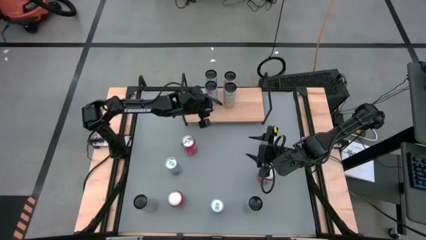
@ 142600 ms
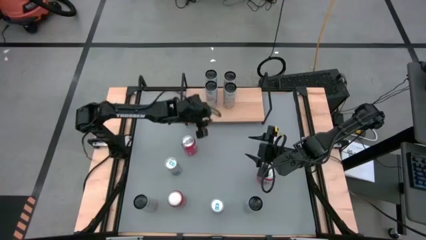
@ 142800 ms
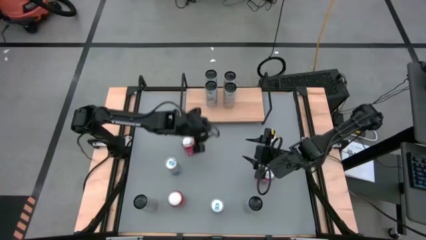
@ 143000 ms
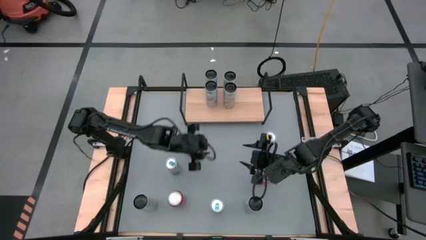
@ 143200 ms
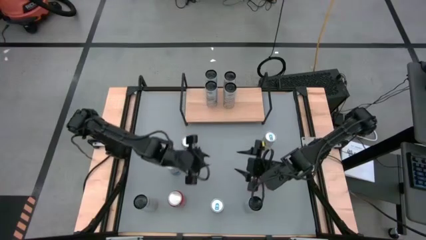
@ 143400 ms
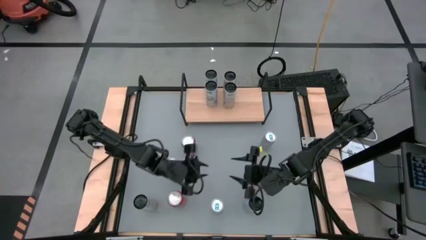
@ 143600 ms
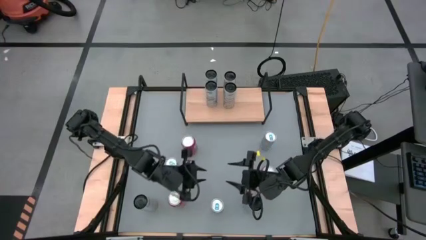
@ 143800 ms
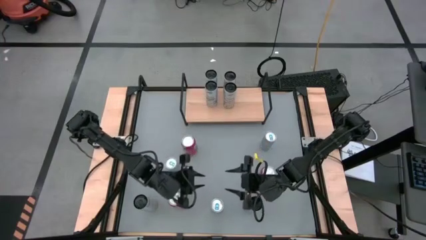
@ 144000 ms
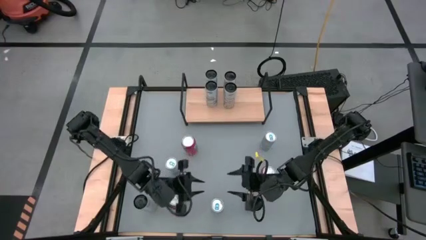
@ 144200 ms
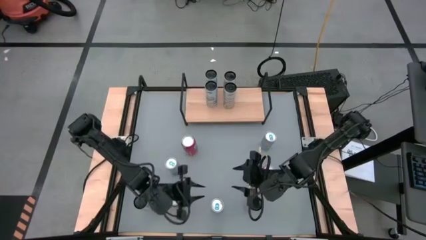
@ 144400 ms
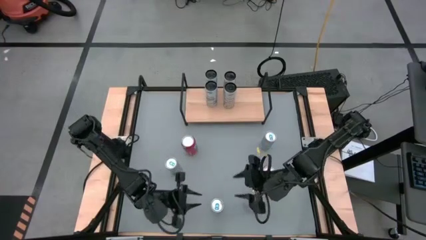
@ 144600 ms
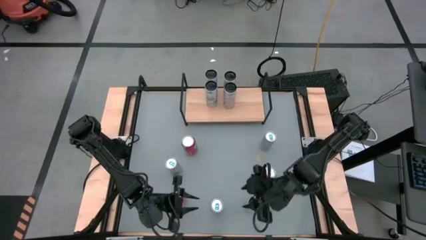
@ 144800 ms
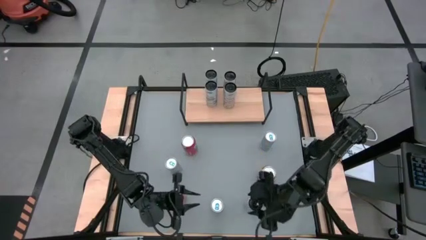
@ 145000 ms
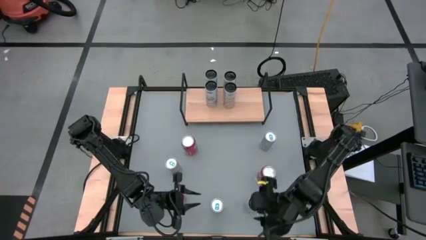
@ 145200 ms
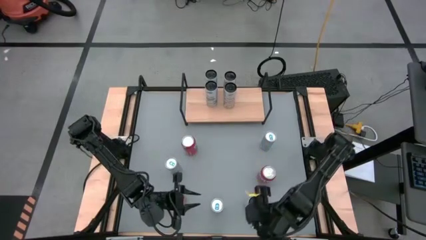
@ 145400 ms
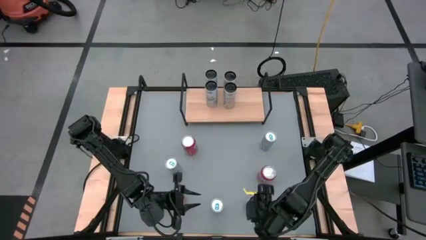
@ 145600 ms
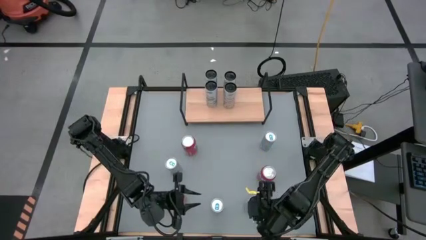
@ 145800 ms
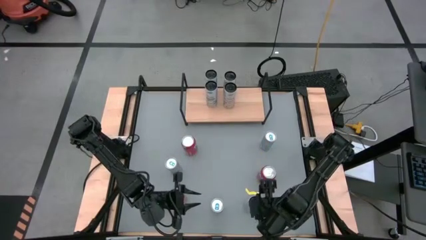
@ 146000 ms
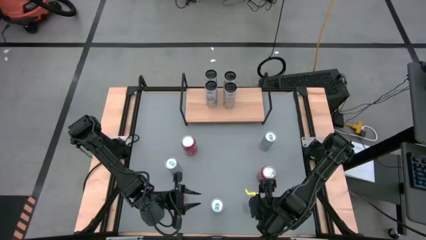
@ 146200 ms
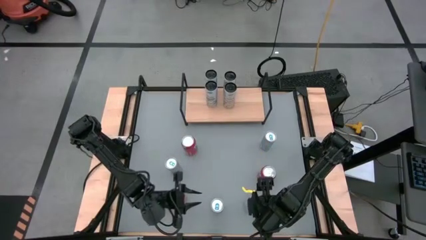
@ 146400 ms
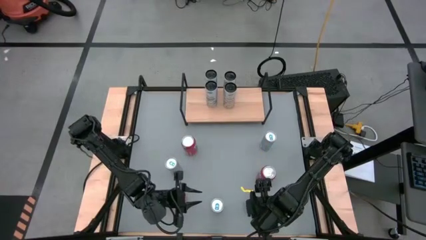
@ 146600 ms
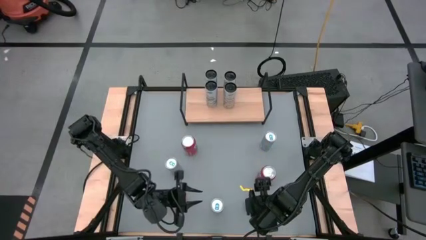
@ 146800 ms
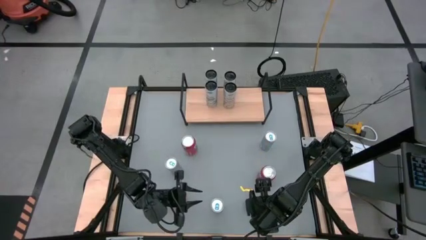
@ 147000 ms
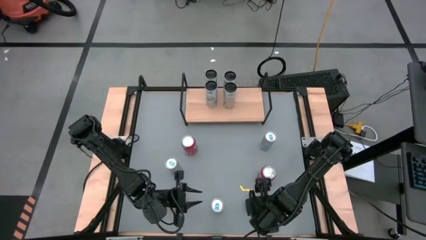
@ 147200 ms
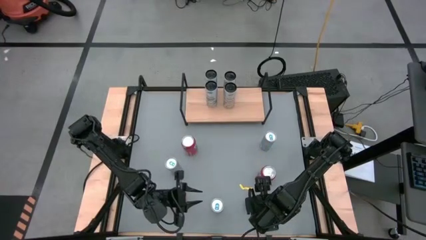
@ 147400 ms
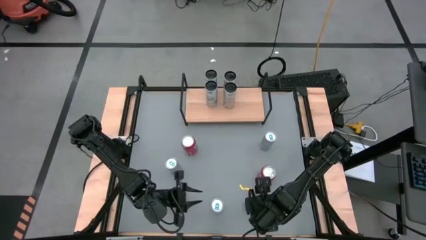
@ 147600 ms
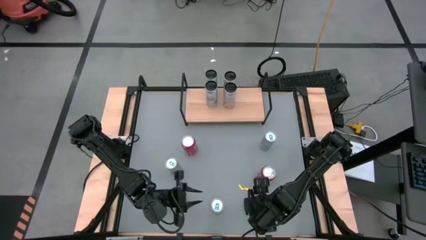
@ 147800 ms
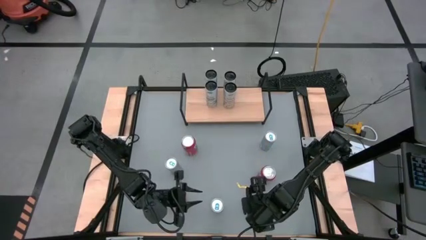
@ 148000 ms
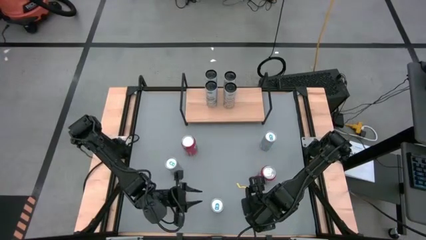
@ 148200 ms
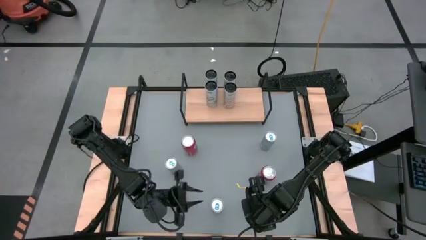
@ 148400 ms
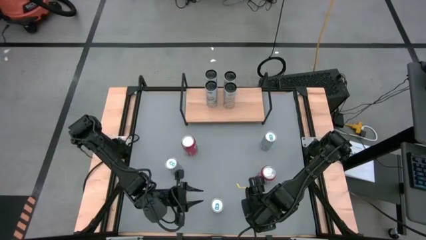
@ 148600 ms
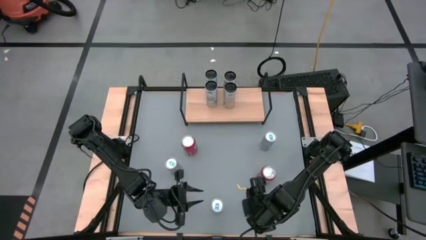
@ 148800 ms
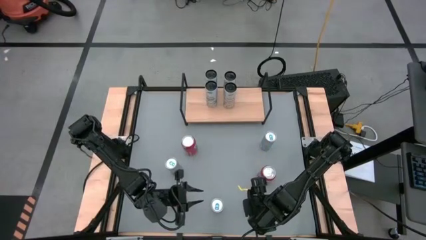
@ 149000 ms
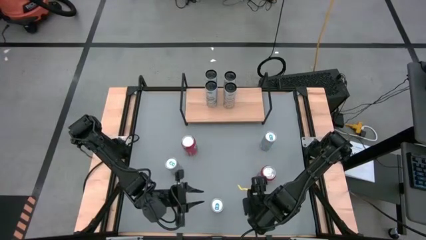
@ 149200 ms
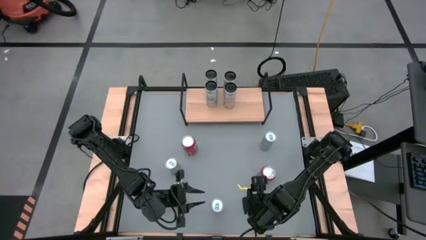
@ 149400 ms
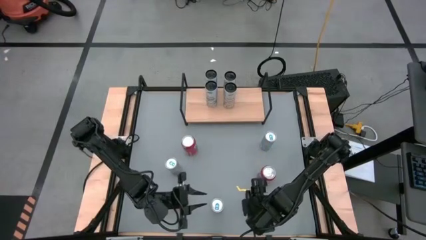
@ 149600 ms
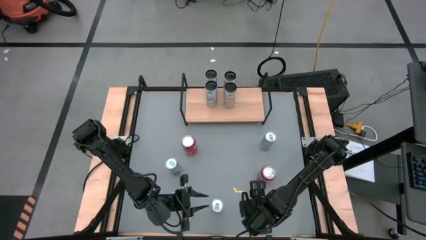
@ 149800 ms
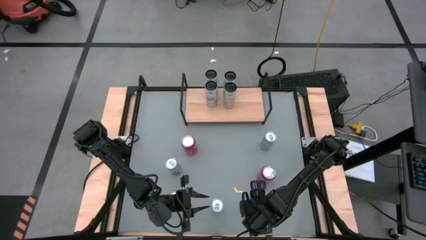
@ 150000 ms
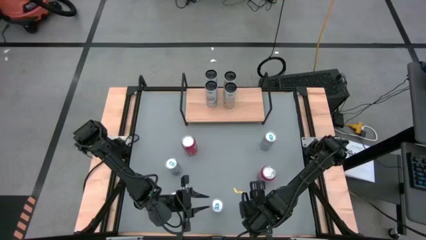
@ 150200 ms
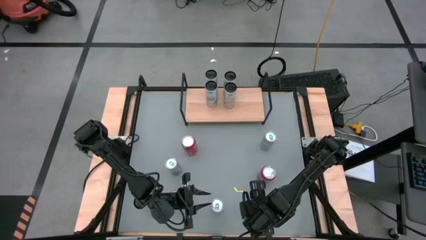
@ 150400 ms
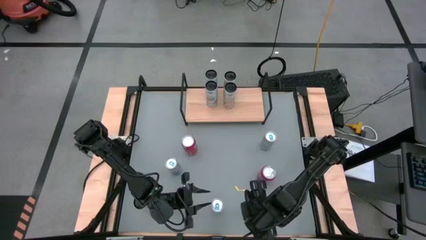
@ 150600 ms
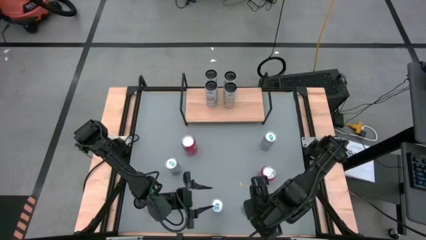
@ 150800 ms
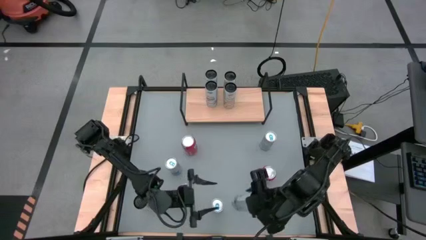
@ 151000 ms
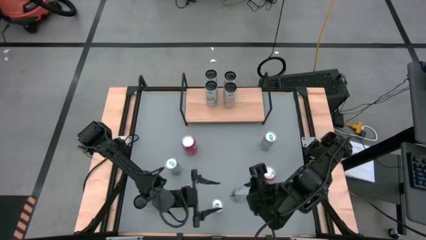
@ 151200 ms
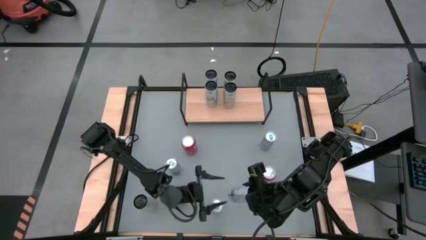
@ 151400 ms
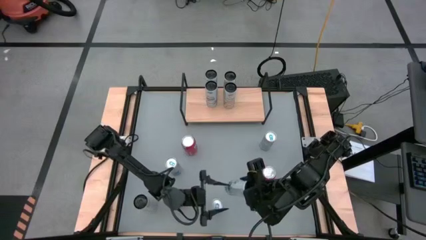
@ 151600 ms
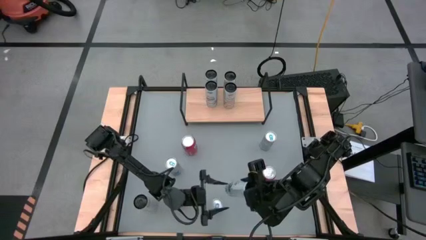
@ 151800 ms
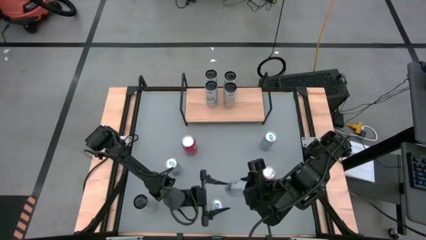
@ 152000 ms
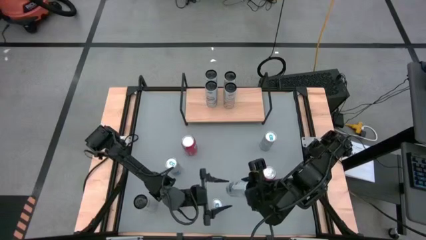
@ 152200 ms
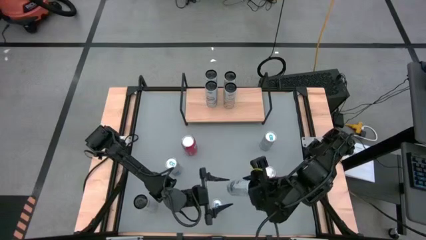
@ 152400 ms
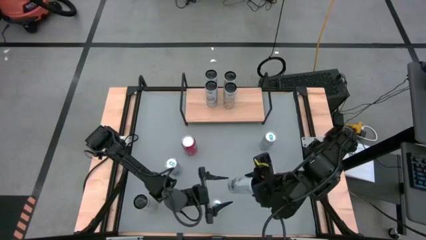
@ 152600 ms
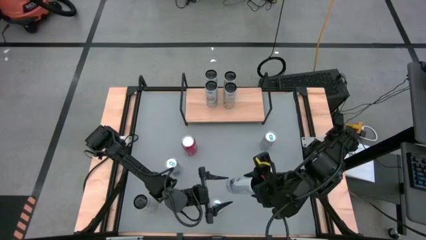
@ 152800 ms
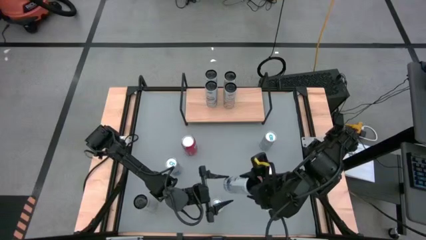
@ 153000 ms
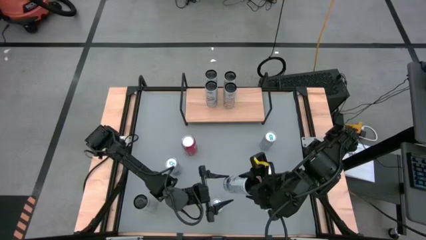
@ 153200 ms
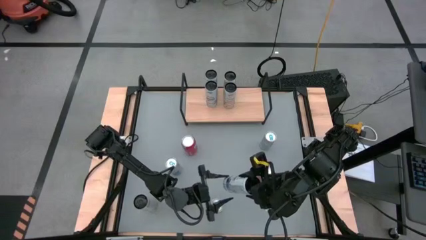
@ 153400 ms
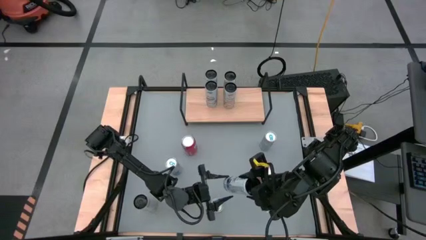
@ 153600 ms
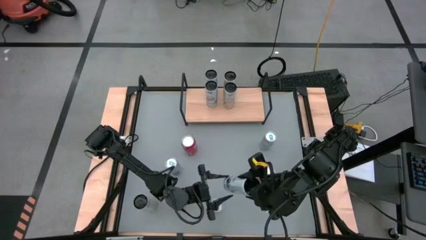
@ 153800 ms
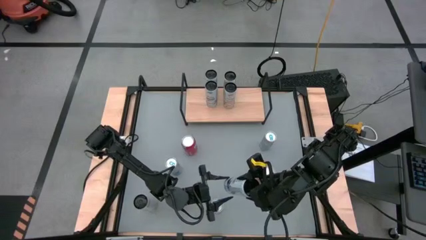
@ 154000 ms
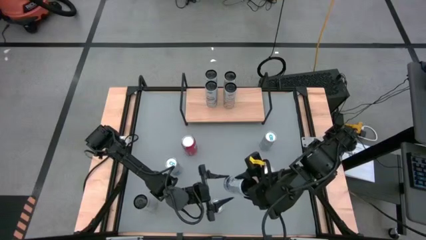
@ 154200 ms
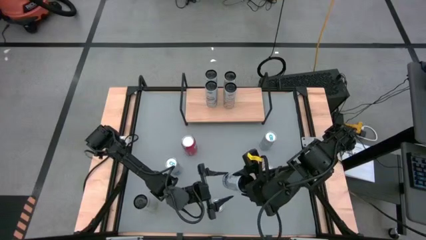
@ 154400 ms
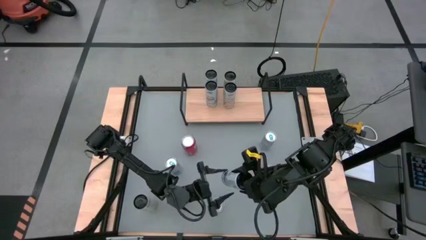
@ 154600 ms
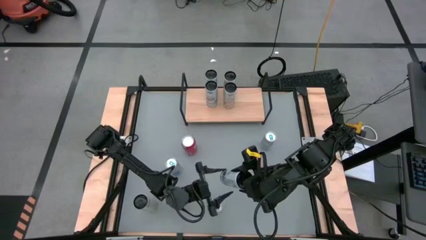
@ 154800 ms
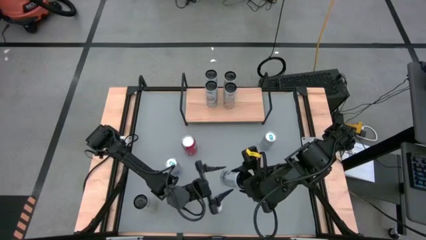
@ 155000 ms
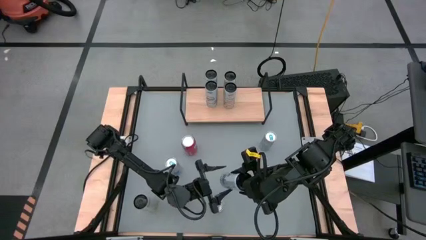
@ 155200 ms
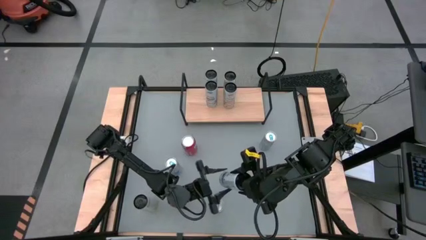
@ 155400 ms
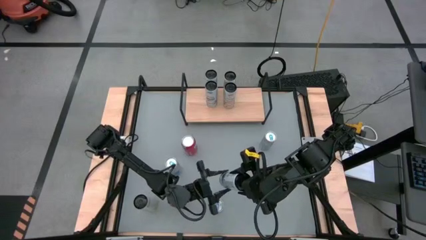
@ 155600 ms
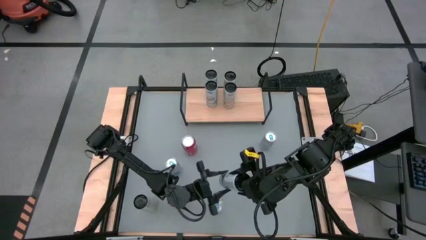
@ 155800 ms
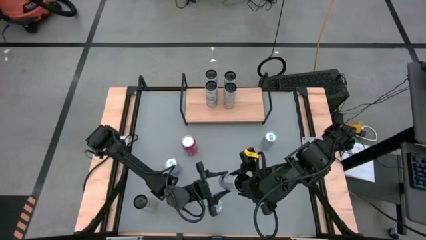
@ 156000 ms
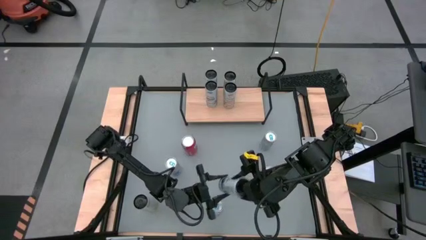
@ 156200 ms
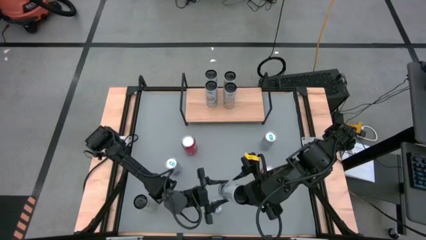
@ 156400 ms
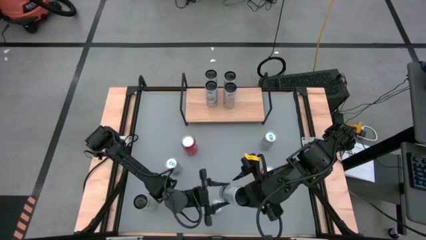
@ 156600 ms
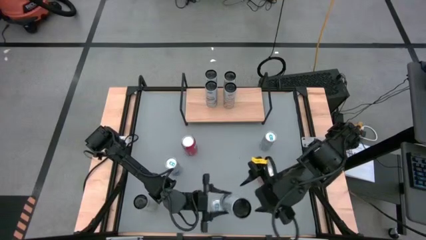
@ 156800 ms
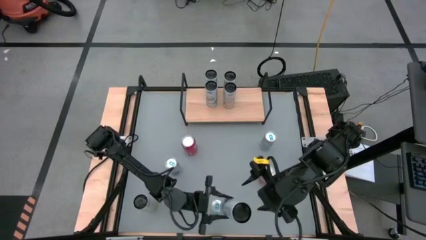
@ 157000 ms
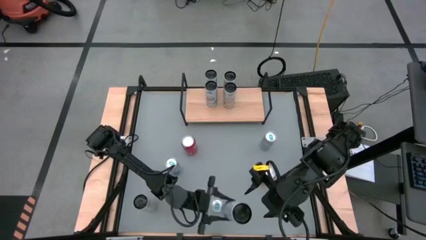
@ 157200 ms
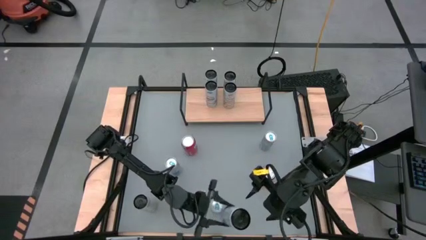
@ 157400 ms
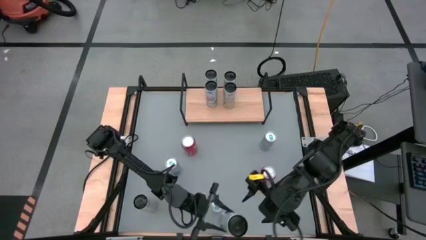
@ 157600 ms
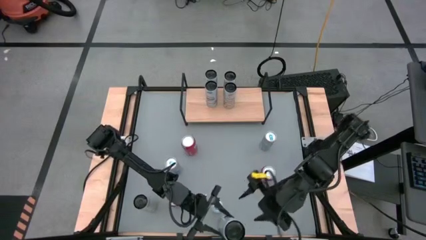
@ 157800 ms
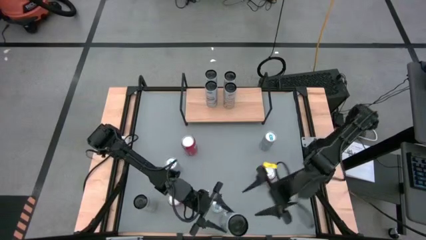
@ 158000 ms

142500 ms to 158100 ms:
Task: Place canned beverage on shelf
Put the white blue soda can aligned with the other white blue soda cans on the shelf
